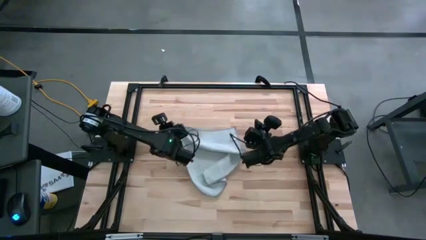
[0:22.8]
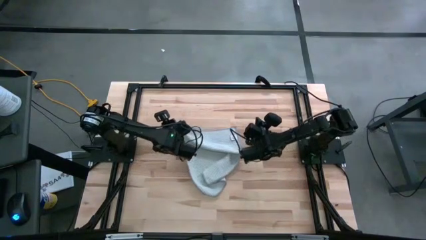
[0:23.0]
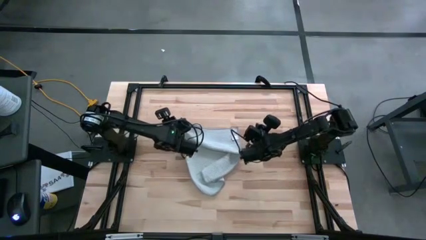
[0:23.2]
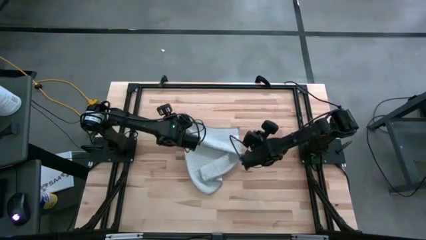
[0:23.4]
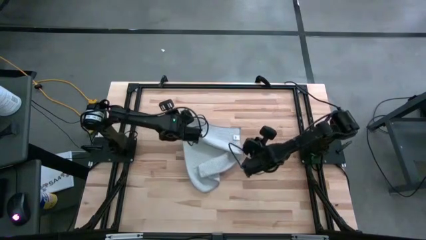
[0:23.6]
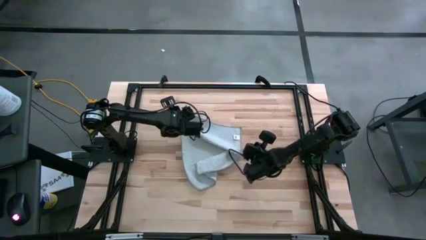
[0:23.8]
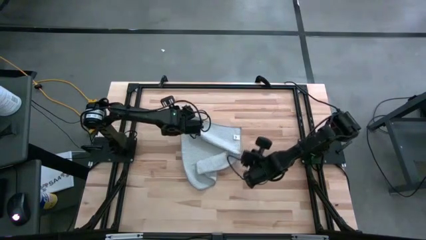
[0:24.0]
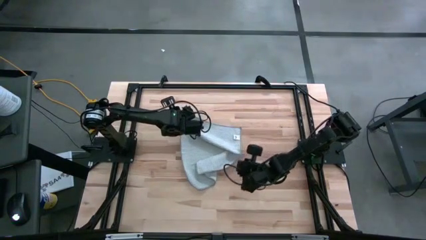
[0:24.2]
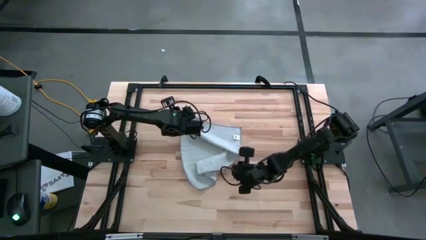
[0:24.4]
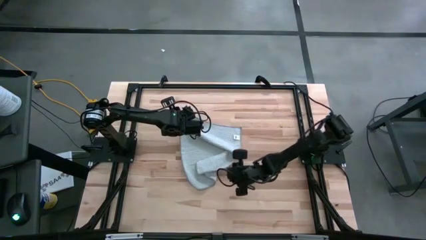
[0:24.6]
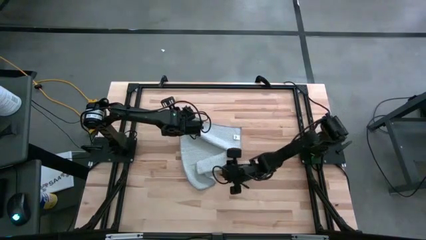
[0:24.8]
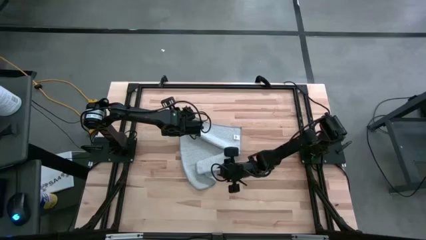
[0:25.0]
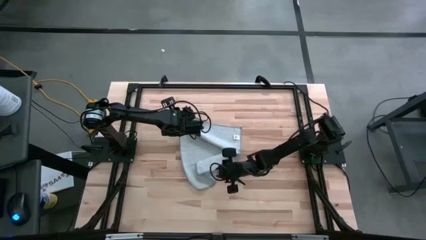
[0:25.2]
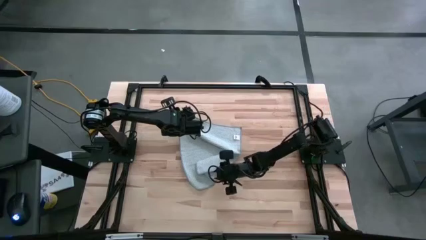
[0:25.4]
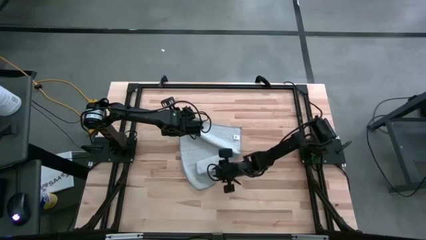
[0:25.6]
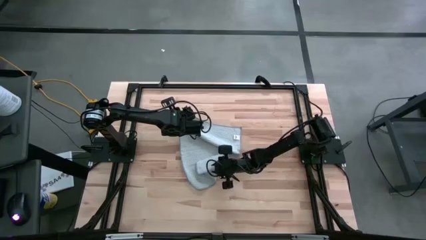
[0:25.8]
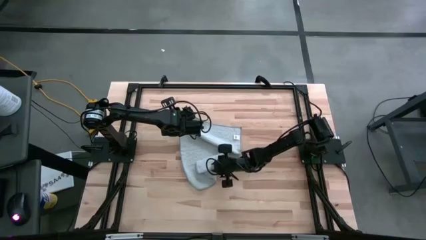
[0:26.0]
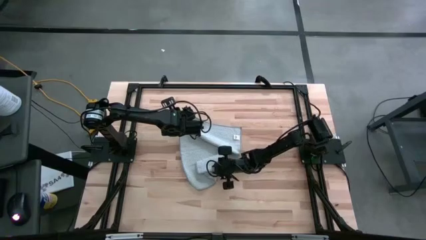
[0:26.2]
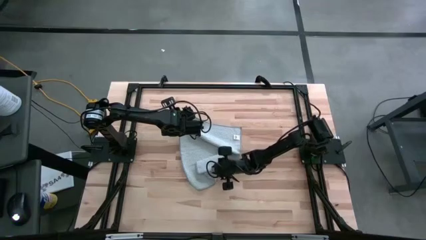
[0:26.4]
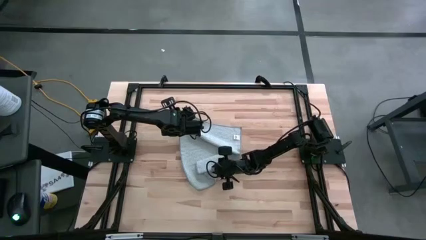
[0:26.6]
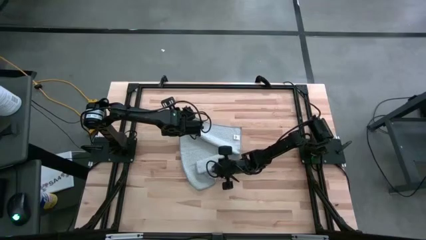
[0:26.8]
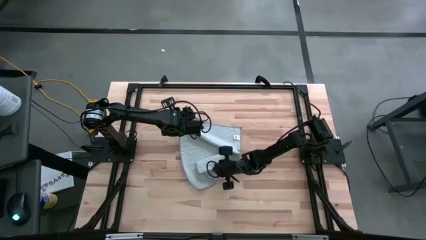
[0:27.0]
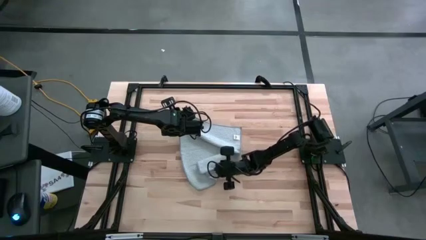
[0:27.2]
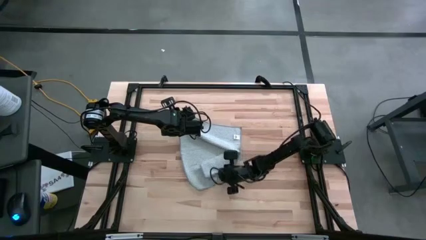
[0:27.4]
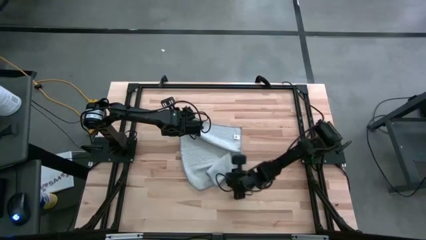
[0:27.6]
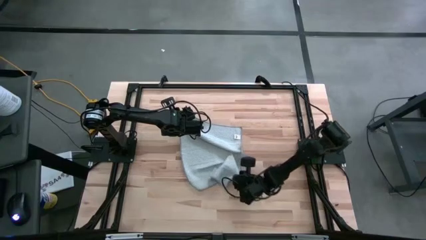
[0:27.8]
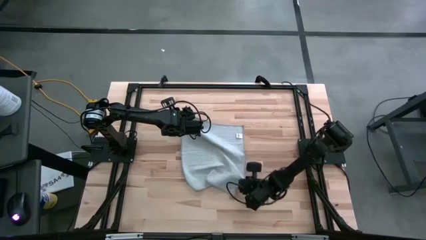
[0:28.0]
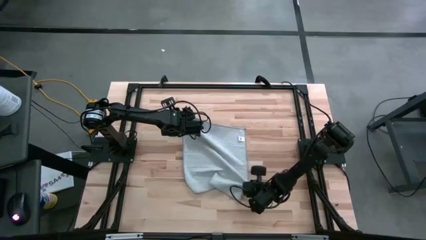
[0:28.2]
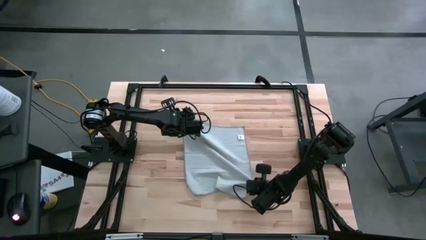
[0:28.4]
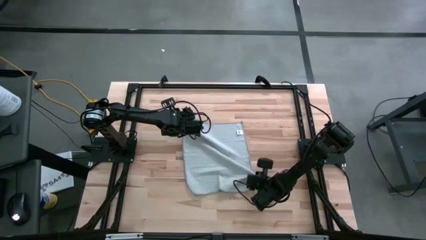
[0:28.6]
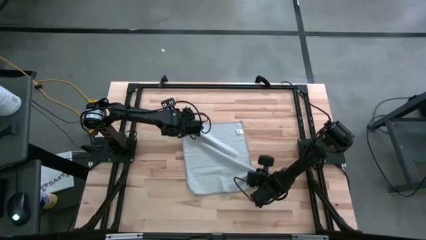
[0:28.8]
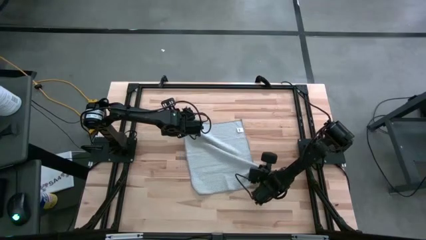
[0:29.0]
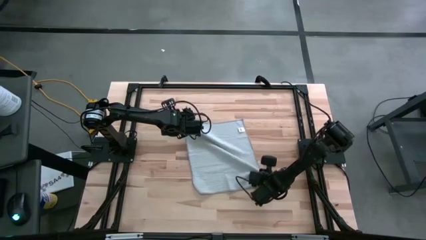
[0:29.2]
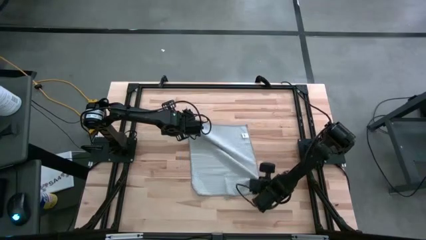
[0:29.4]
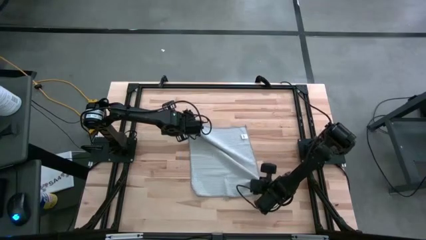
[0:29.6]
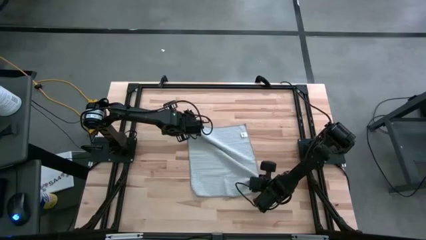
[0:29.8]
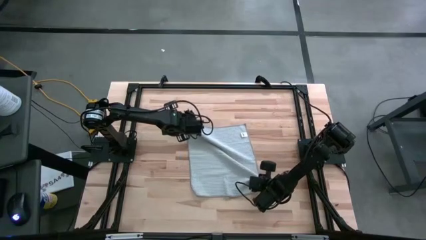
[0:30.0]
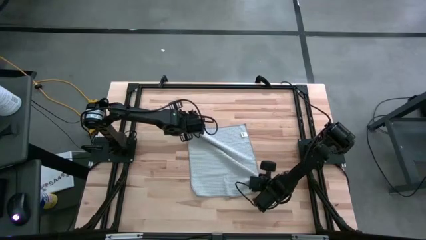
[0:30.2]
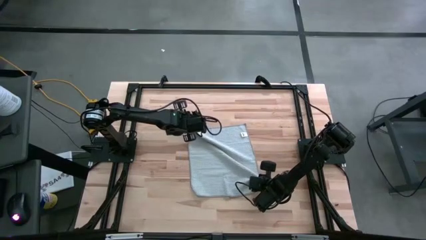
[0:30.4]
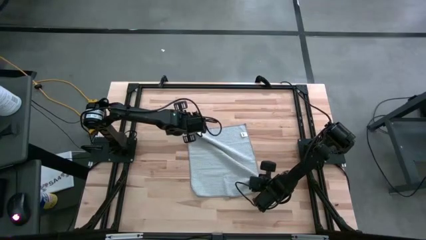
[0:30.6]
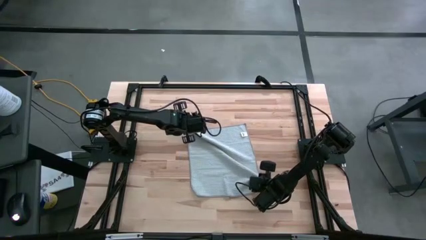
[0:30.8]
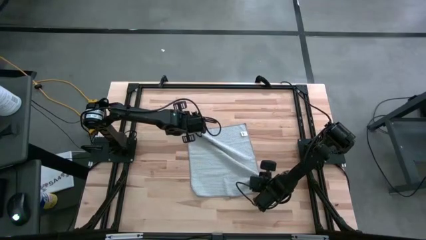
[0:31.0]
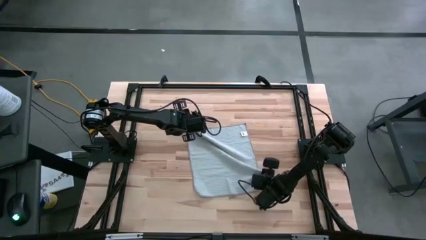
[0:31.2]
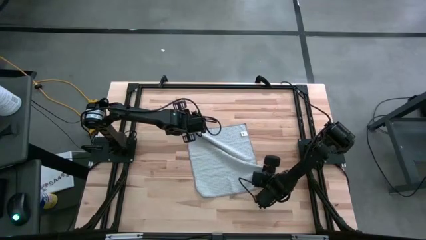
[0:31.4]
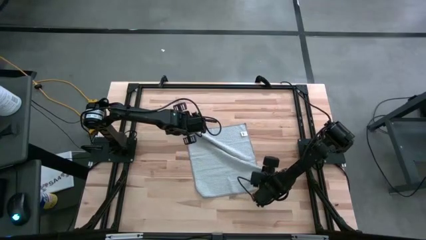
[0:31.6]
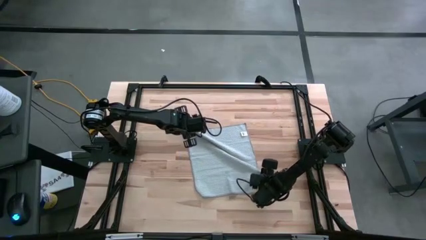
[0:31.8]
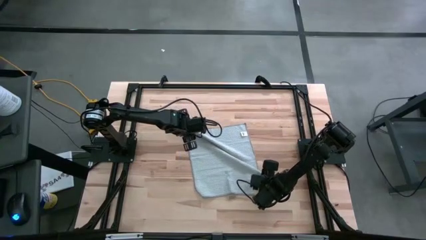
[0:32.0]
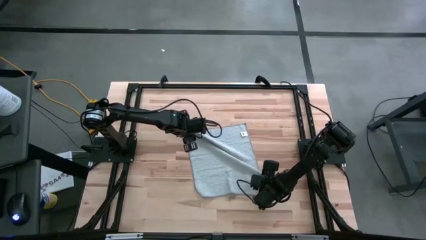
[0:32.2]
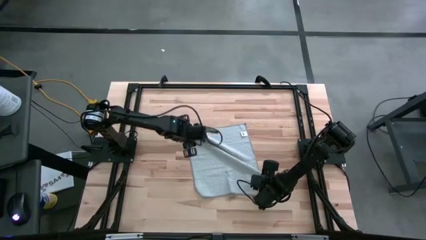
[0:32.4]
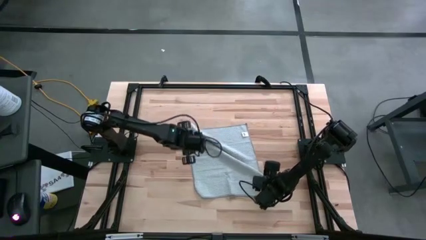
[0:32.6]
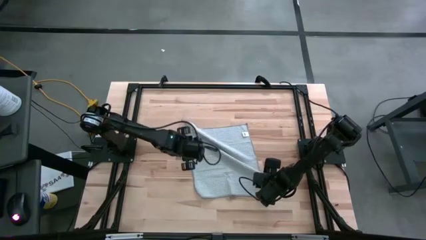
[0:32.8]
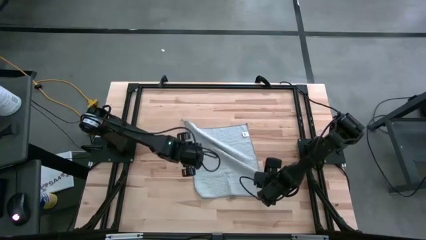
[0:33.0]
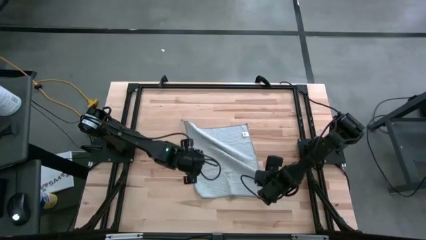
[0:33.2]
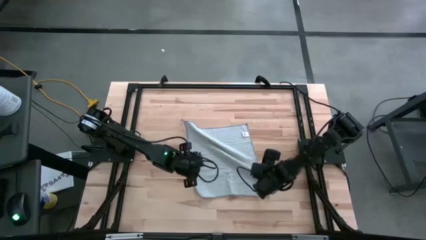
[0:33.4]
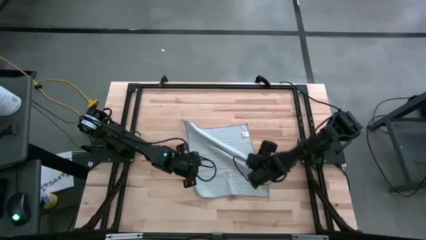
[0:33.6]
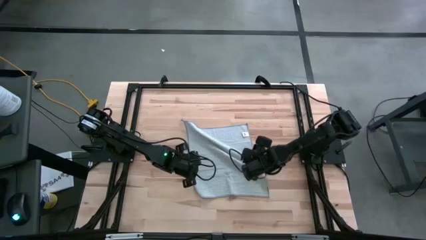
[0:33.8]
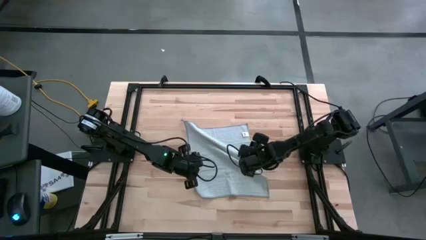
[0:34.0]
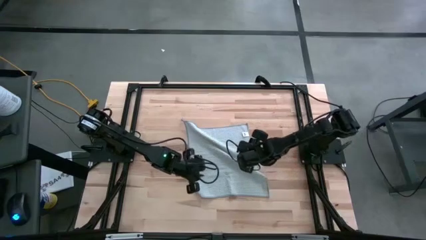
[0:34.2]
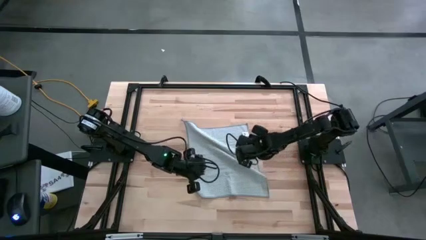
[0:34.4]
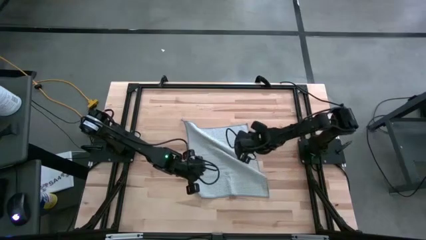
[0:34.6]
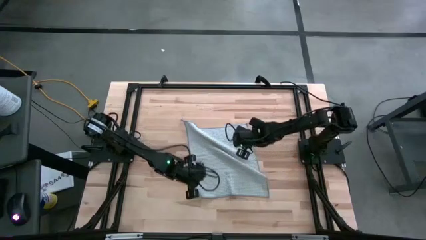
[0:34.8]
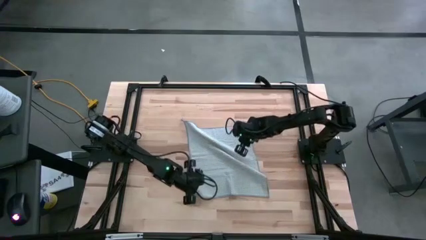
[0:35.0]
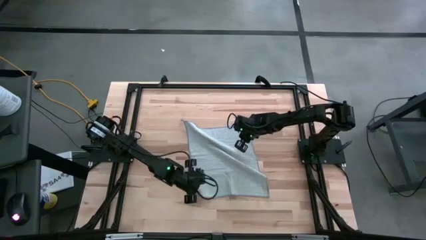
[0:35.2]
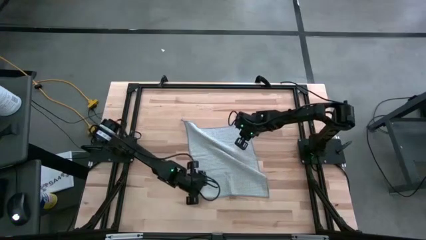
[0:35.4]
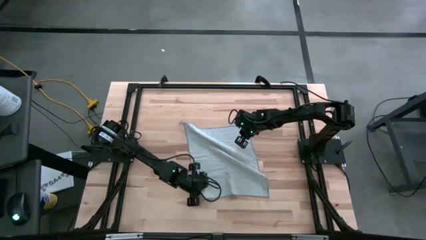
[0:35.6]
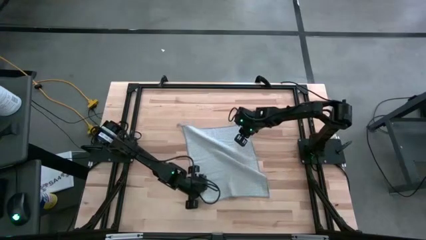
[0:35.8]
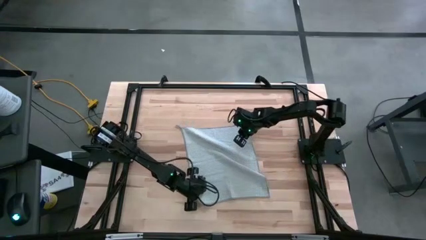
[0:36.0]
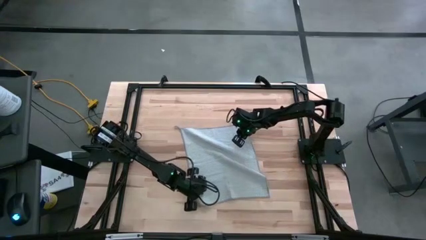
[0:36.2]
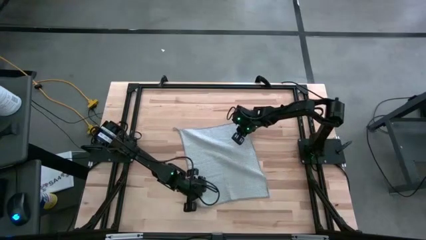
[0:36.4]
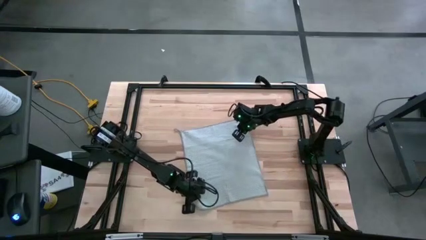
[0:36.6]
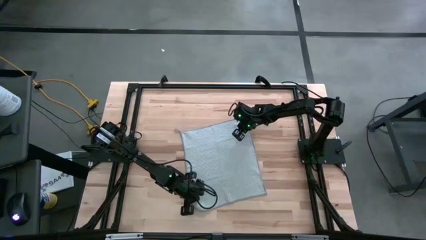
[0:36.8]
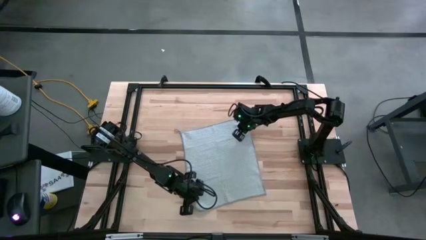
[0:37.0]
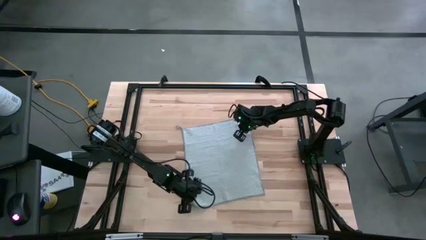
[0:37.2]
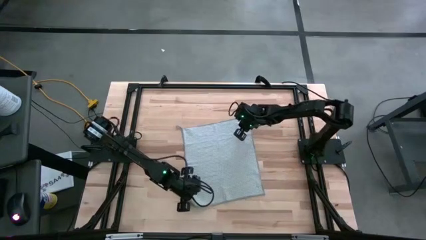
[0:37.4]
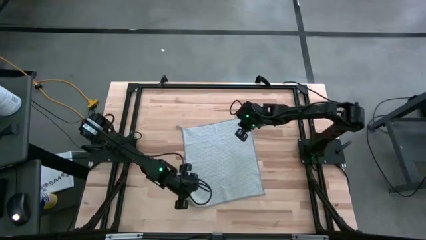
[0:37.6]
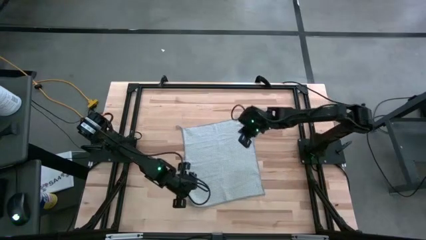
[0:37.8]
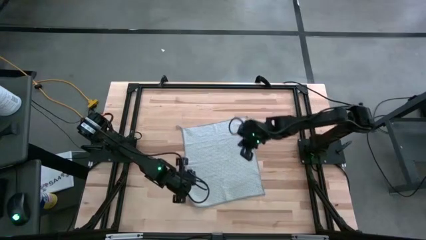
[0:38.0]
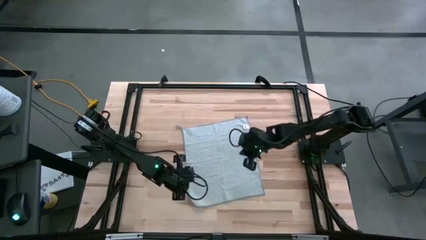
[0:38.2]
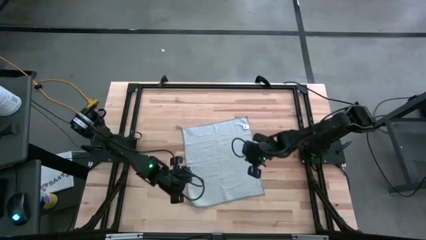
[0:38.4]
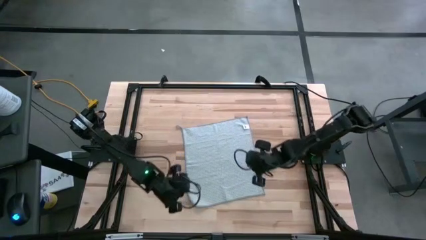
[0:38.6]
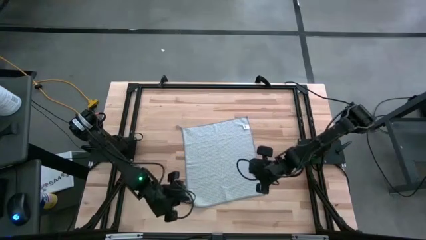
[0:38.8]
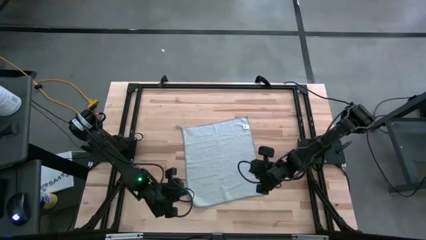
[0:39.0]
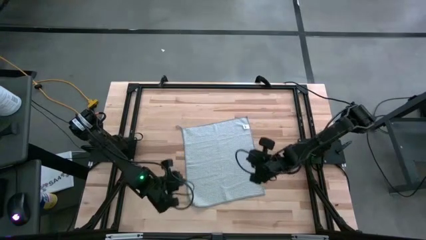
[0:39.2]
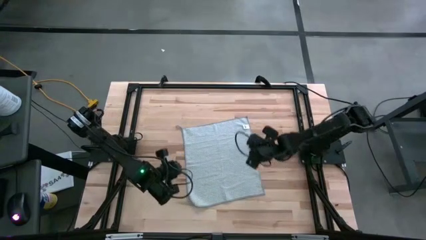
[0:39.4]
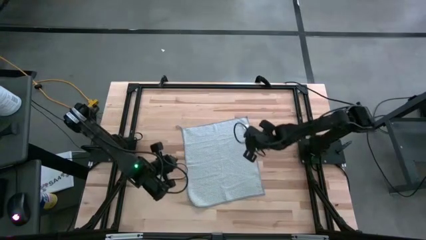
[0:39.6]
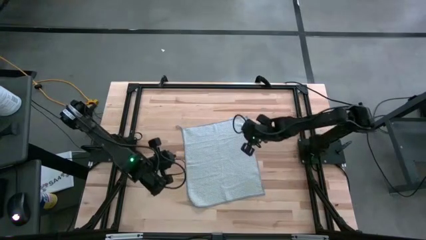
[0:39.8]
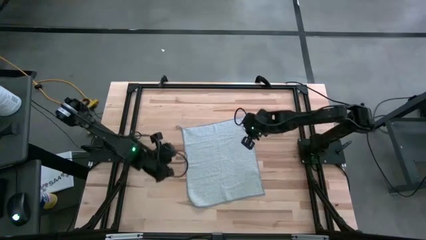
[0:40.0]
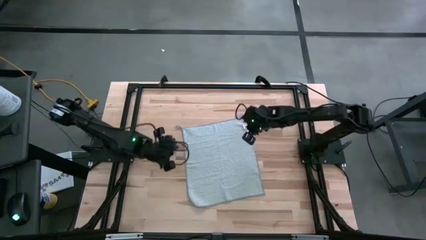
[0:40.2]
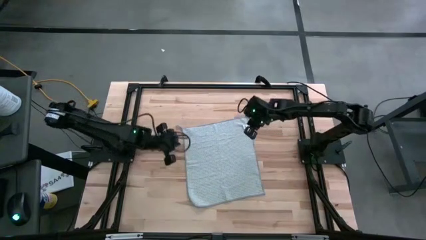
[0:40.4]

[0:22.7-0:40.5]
Task: Fold microfiber towels
Fold the gray towel on the table
